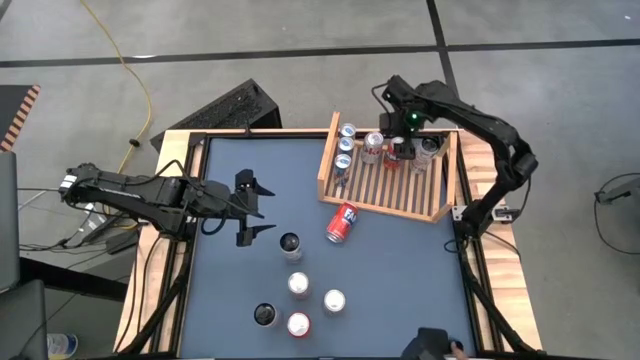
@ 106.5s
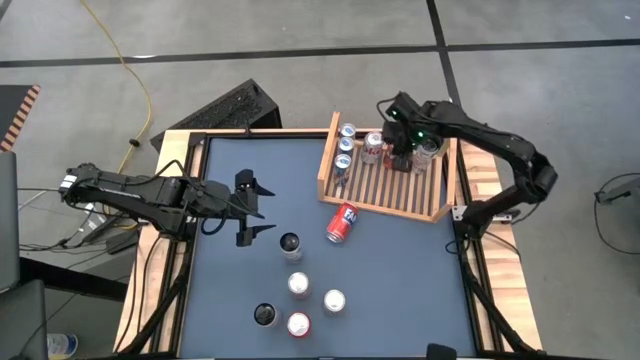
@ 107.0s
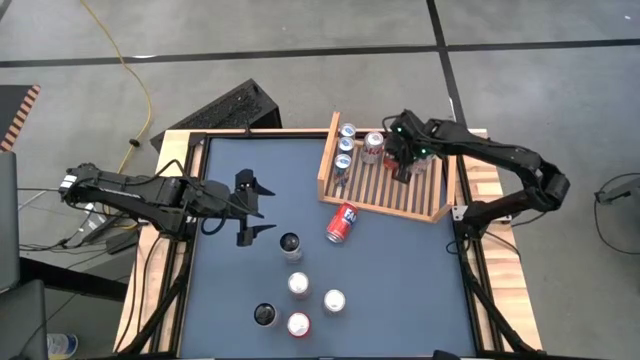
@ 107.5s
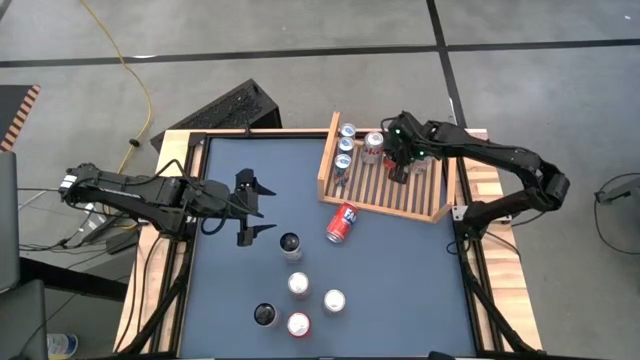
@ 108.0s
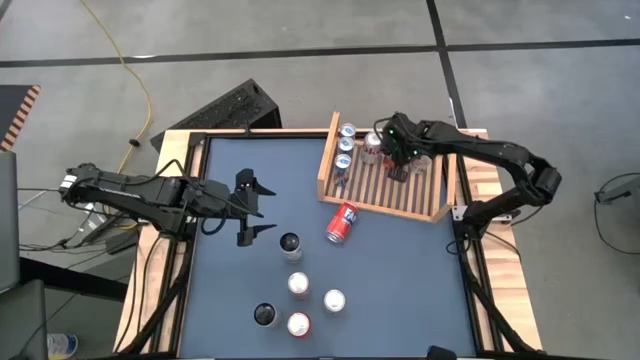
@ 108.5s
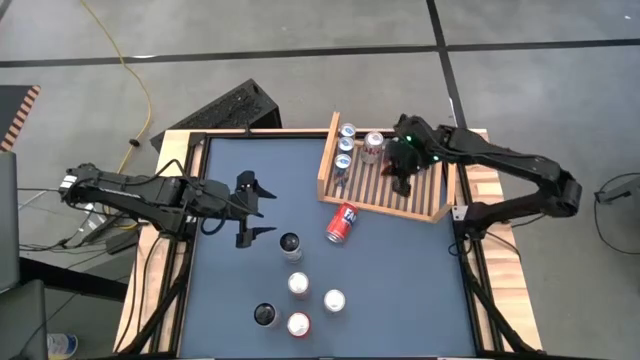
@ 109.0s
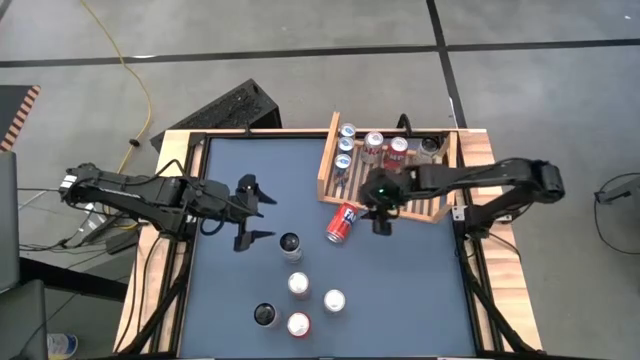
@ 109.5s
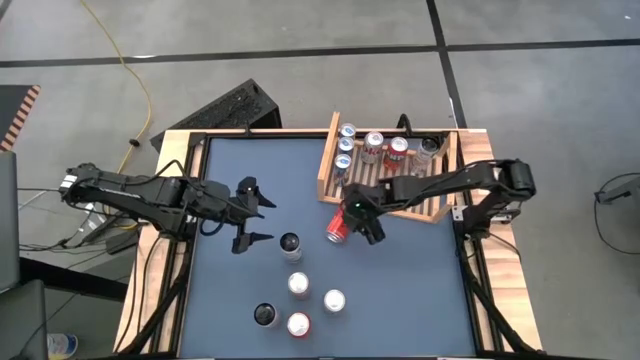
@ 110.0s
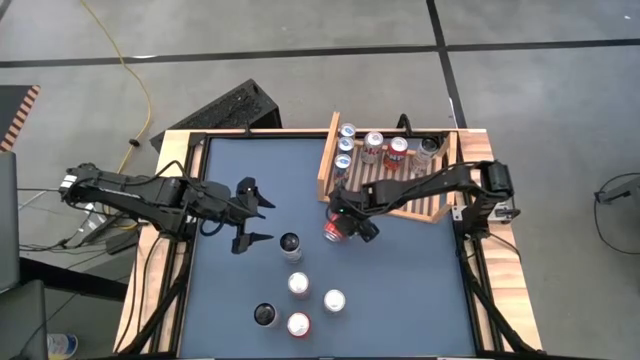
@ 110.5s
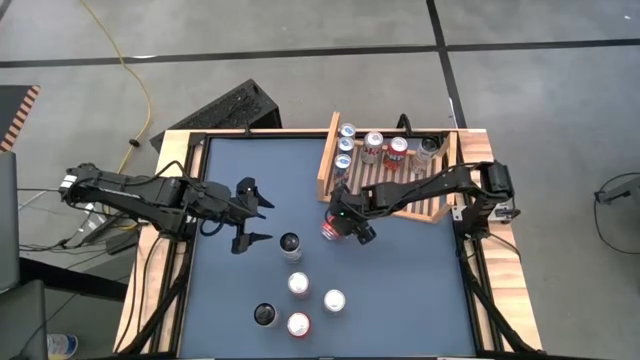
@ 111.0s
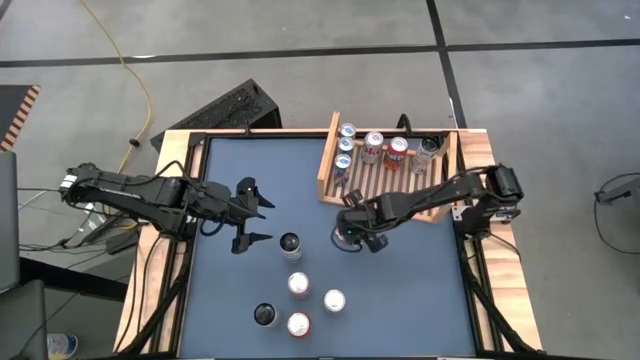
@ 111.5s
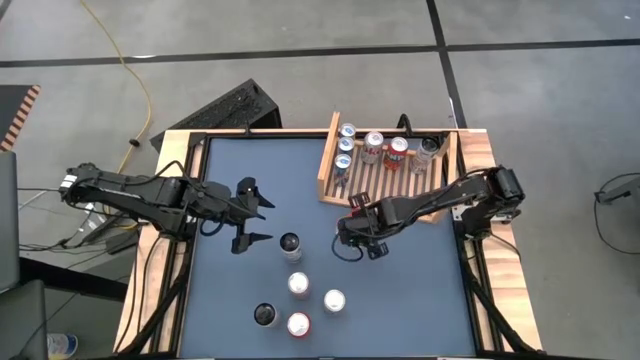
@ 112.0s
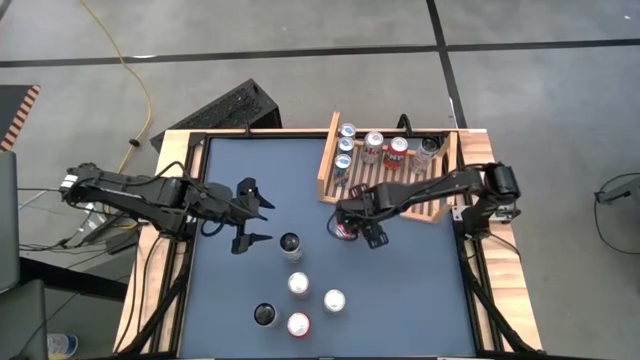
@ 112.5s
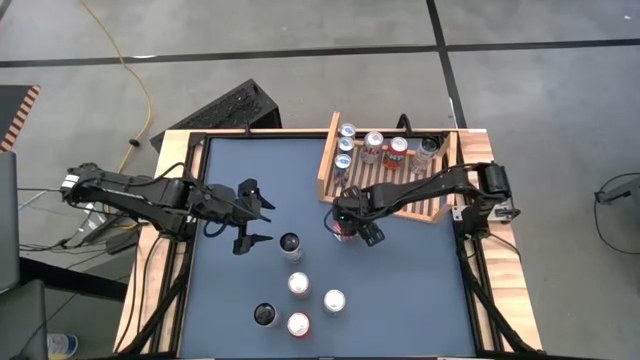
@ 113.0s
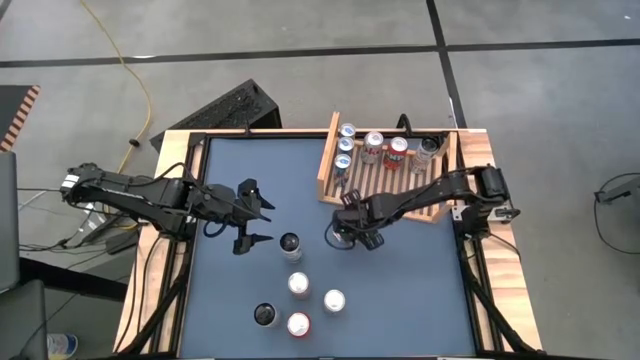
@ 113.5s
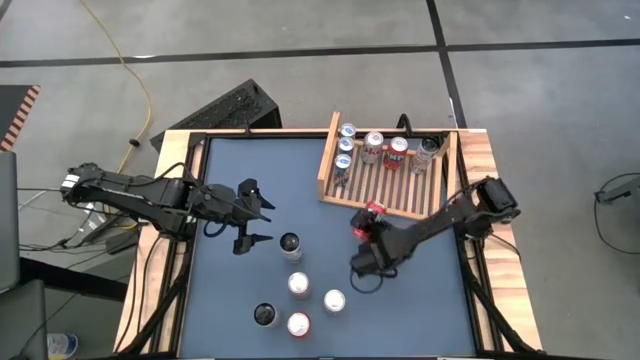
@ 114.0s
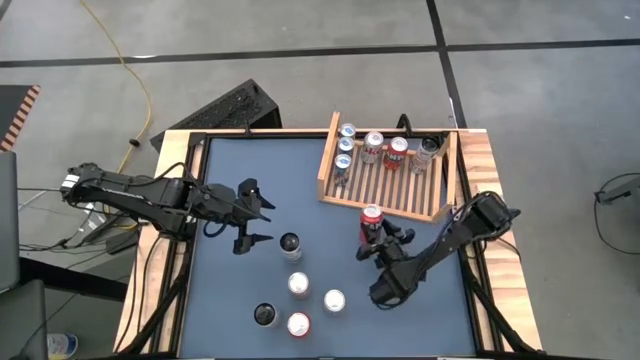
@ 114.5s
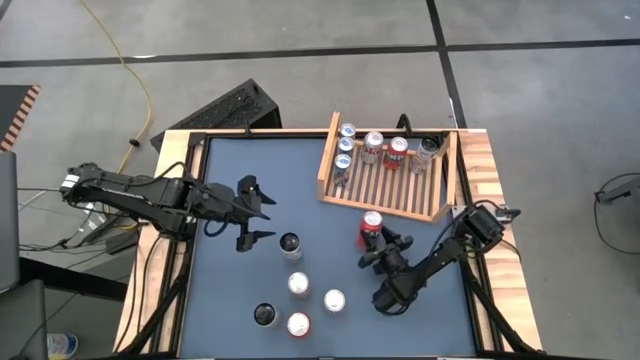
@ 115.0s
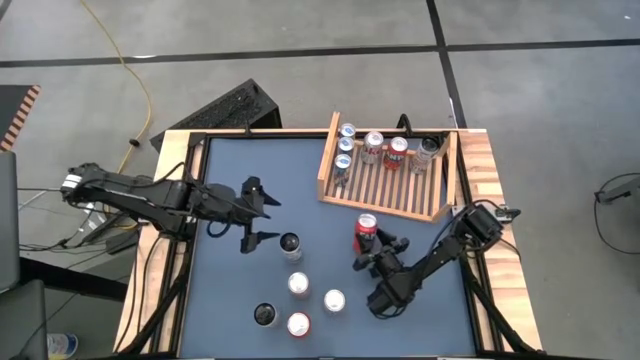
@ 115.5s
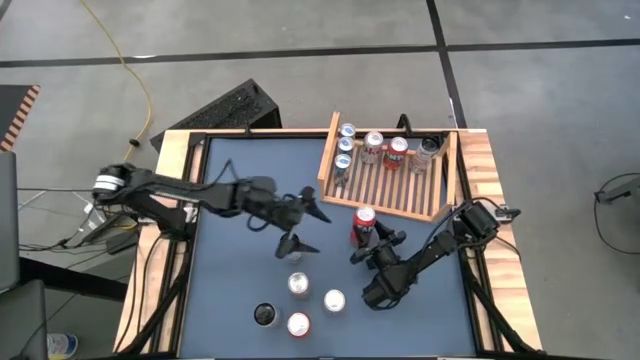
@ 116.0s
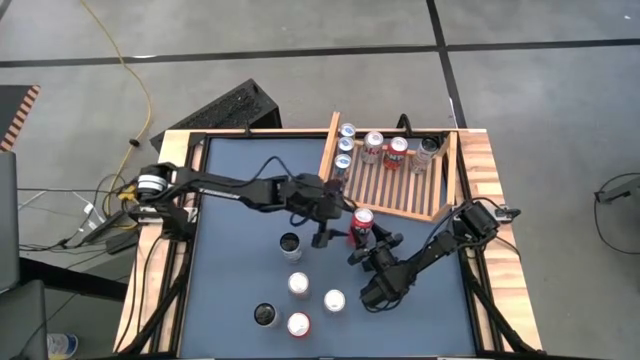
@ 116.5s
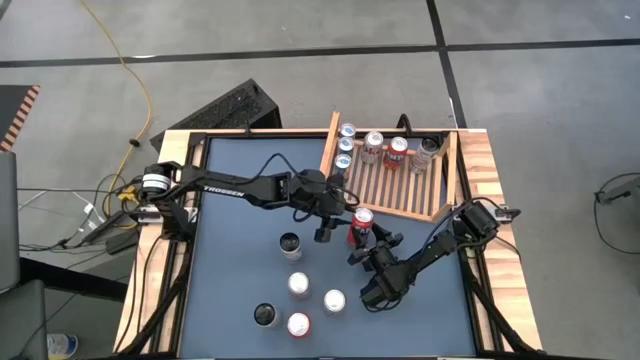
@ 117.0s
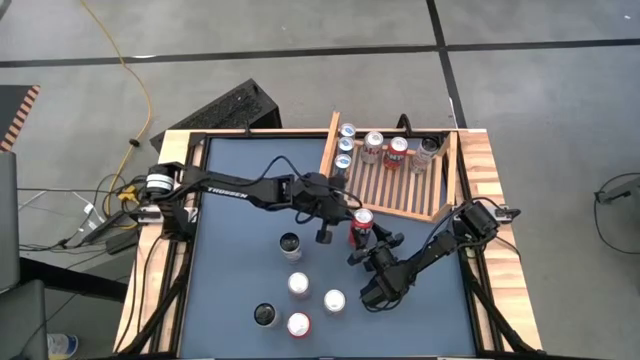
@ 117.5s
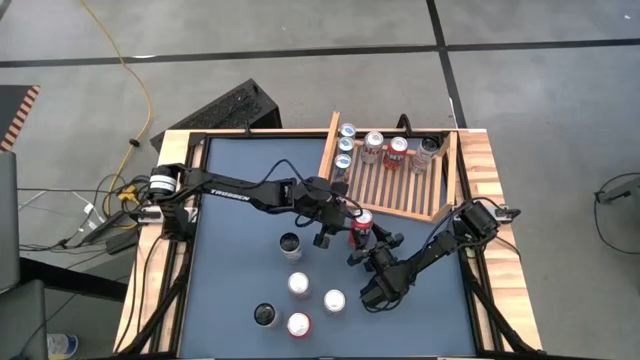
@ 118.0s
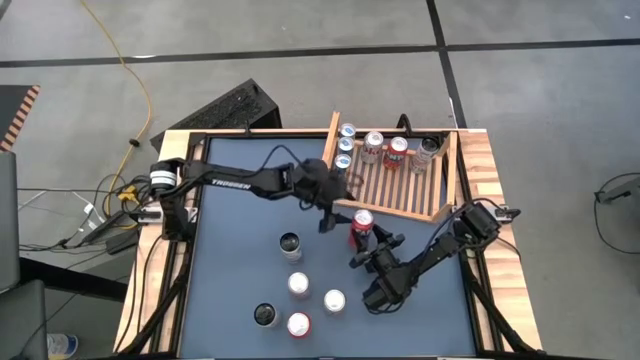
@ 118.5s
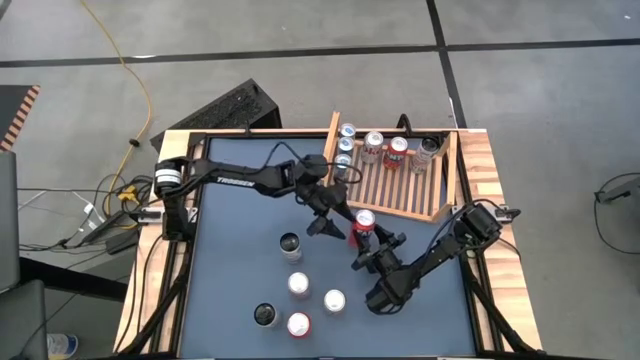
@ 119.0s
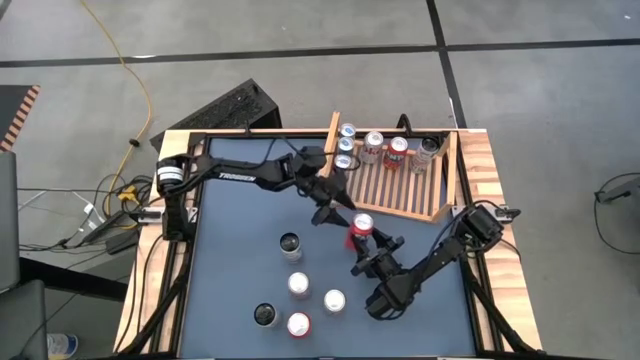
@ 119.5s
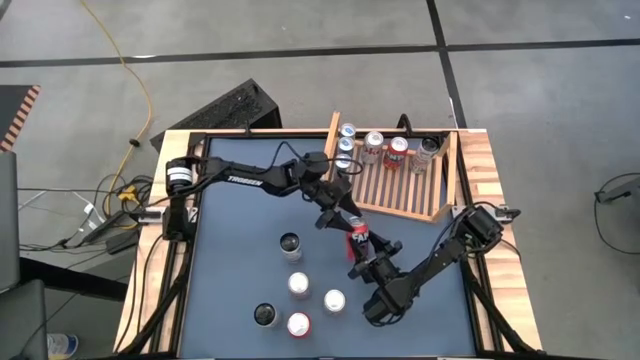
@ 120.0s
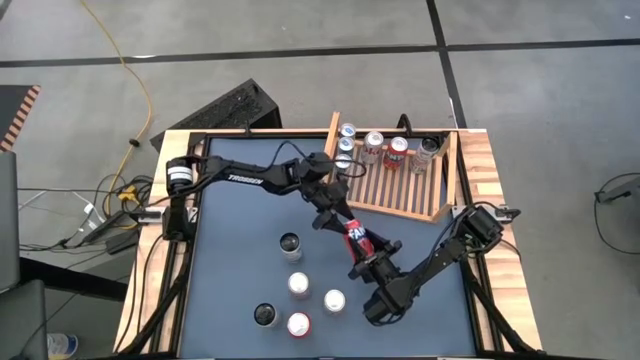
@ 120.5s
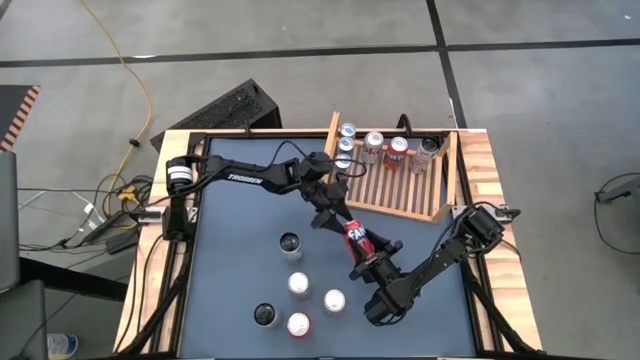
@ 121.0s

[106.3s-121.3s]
Task: Place canned beverage on shelf
Put the top red soda can aligned with the other red soda can on the shelf
